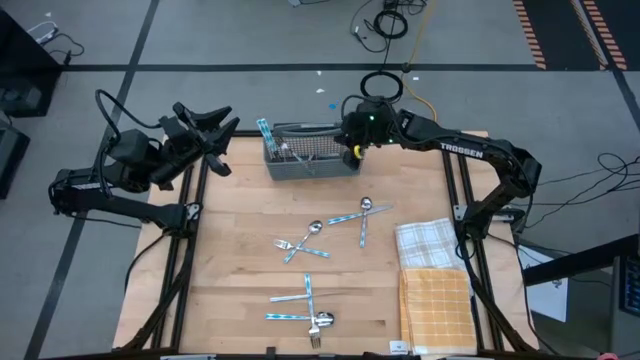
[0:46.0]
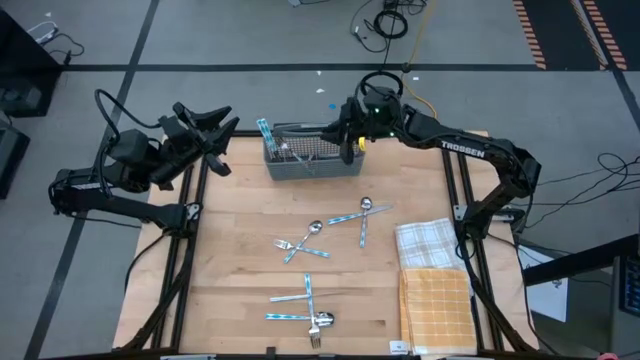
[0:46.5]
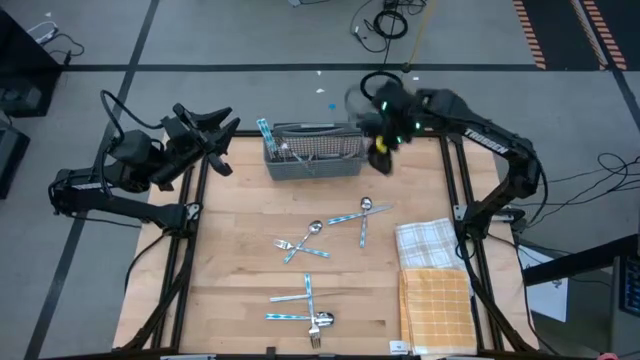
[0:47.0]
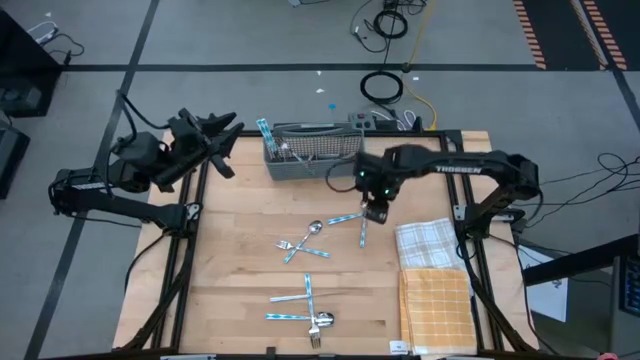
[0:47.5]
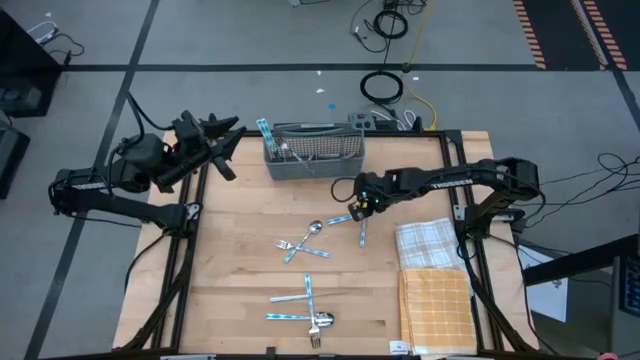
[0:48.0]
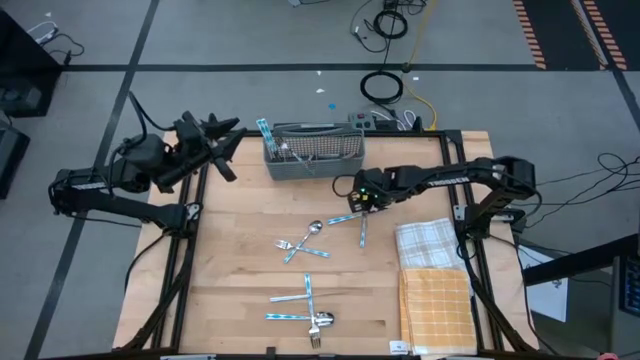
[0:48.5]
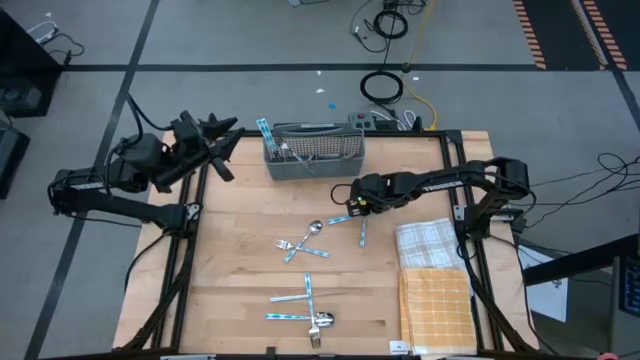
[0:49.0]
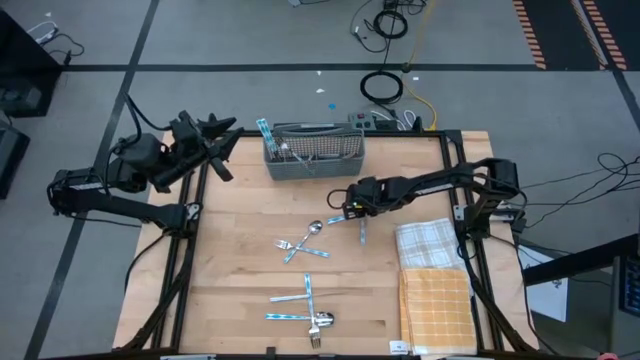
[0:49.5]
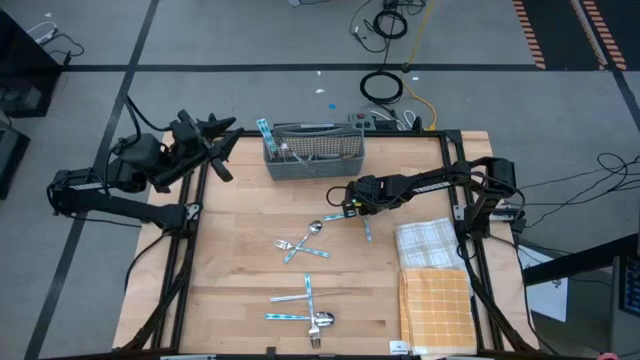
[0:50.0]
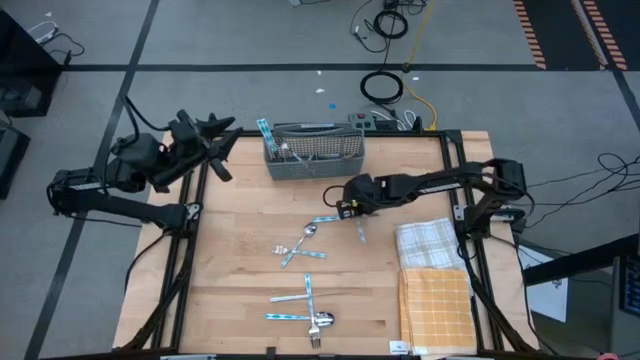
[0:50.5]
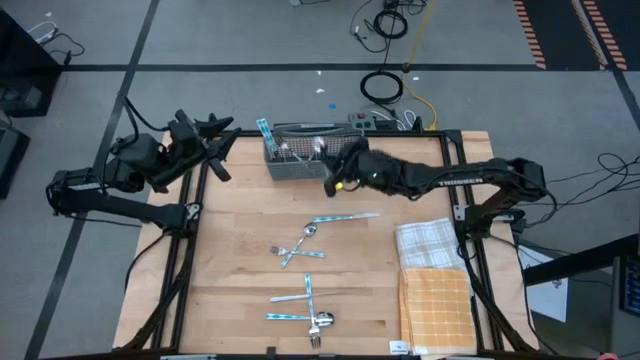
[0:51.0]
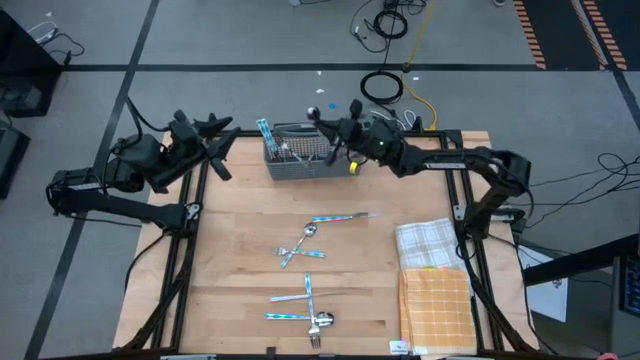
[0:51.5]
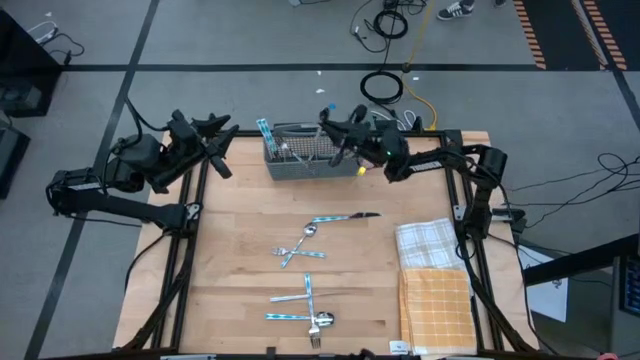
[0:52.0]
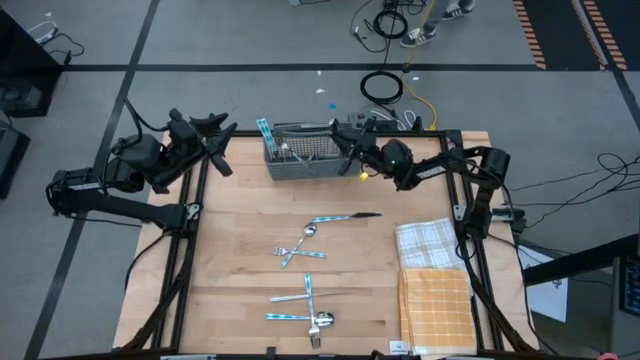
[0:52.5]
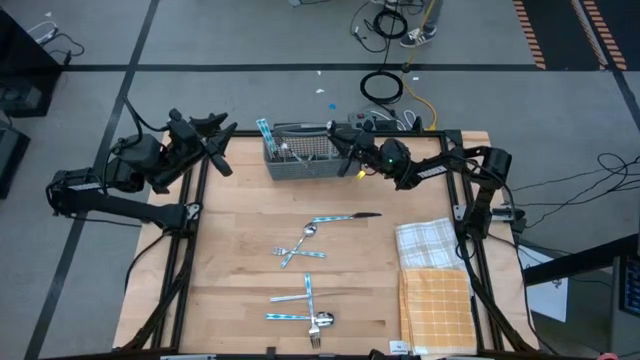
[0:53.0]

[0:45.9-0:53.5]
Task: Sort silverware
Put the top spoon into the middle right section of the utensil holder

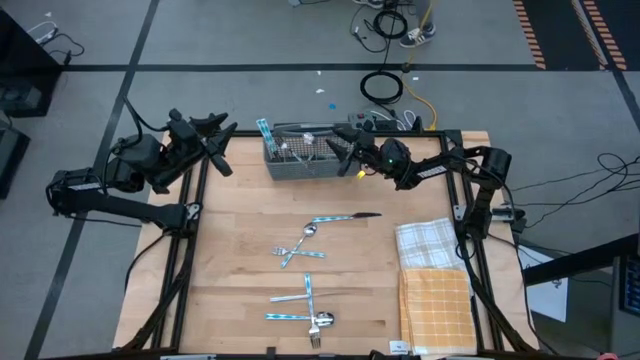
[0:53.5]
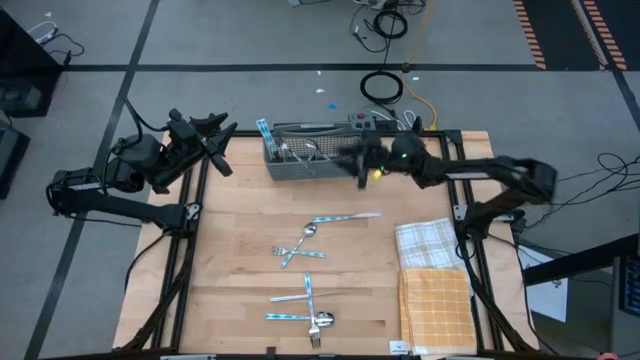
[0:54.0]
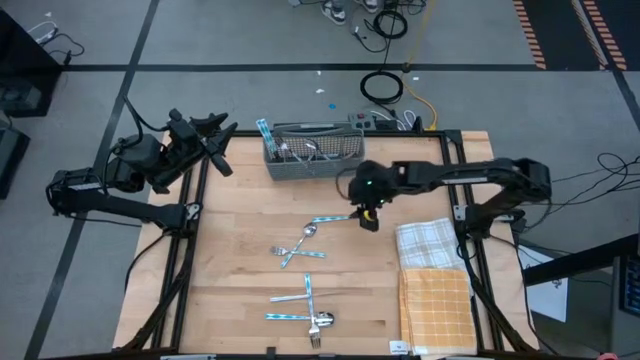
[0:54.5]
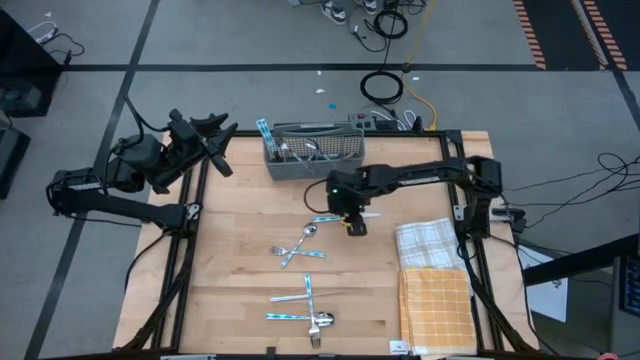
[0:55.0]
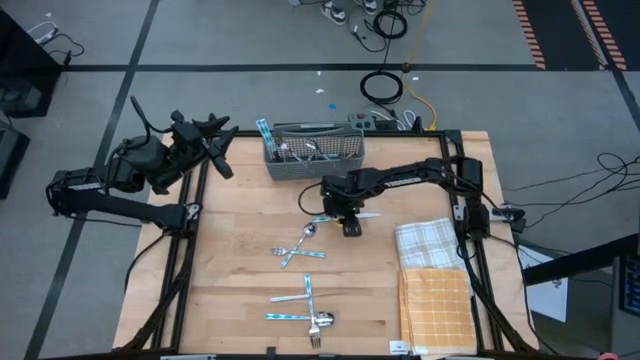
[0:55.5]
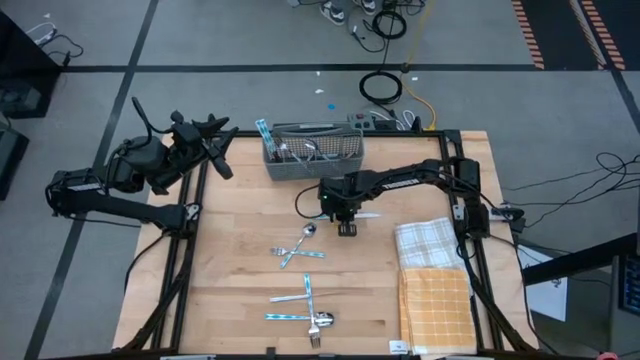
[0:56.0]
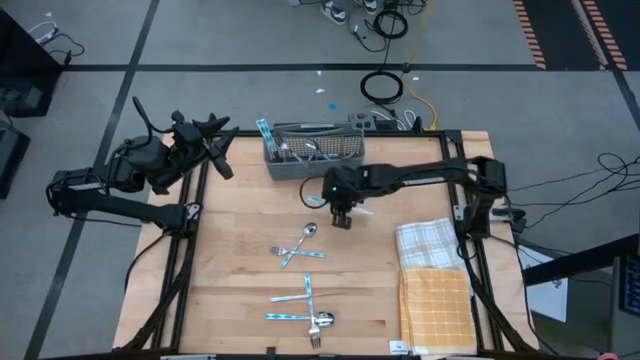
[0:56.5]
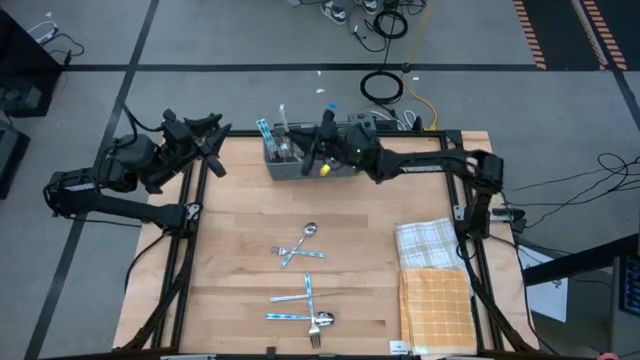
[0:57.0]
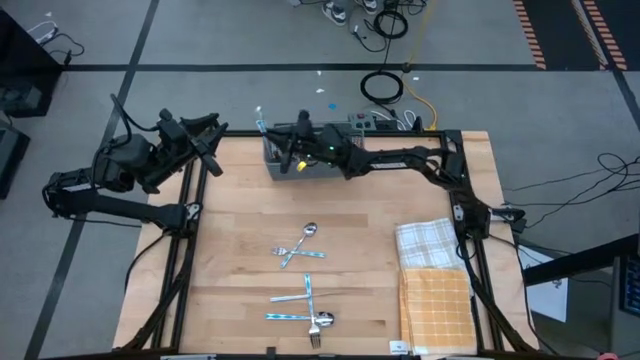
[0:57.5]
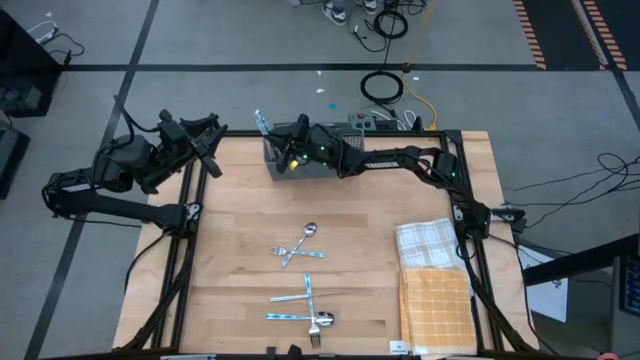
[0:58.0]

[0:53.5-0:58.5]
Put the top knife into the left section of the utensil holder

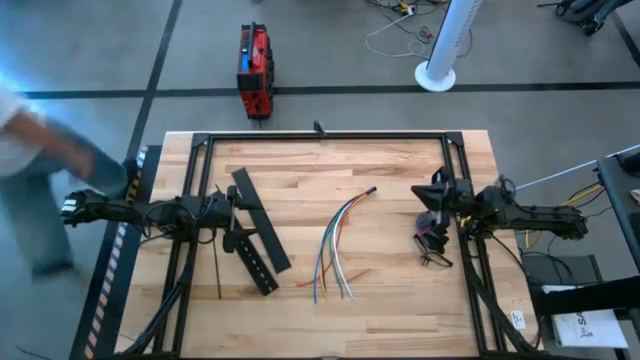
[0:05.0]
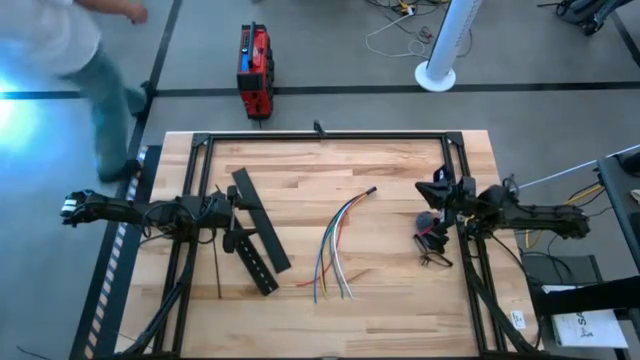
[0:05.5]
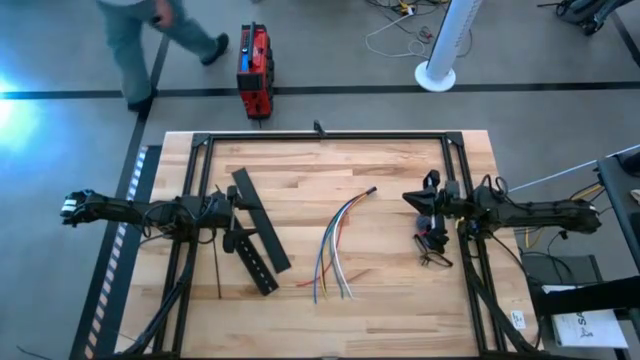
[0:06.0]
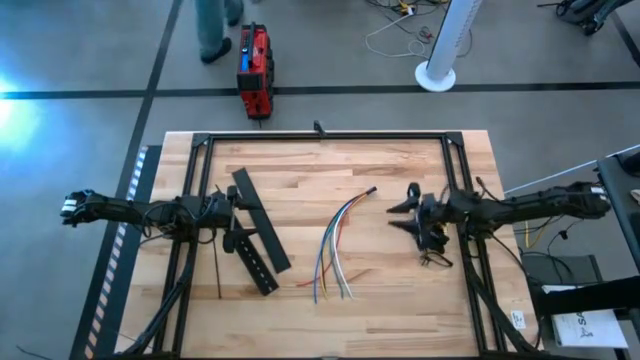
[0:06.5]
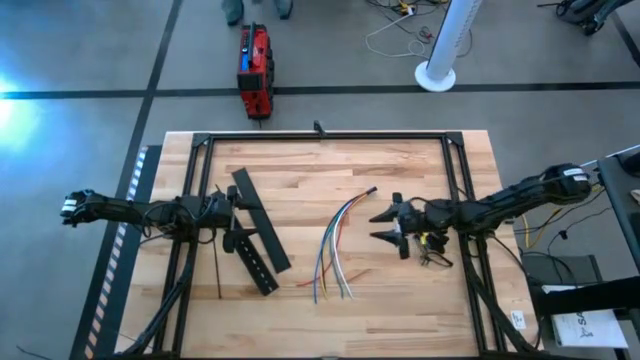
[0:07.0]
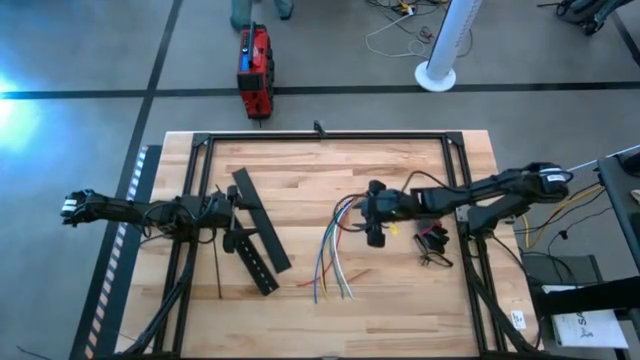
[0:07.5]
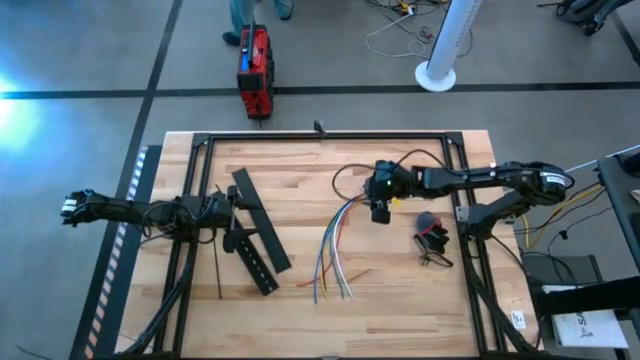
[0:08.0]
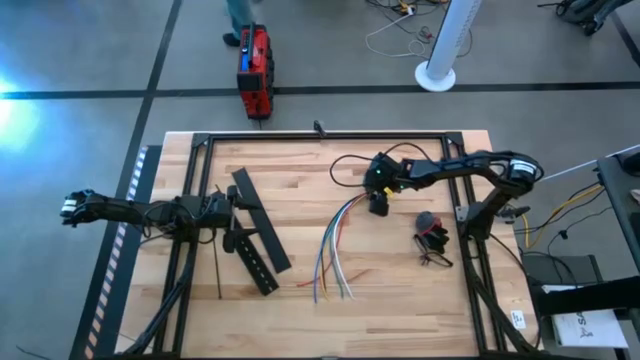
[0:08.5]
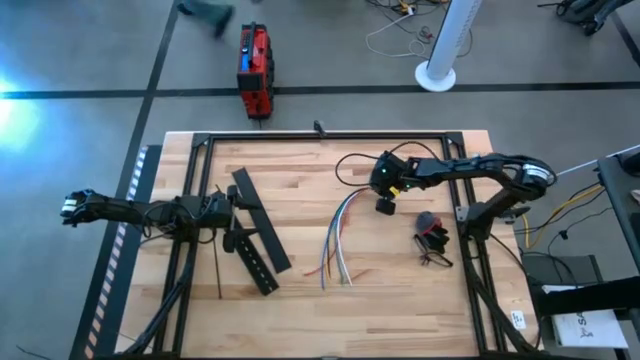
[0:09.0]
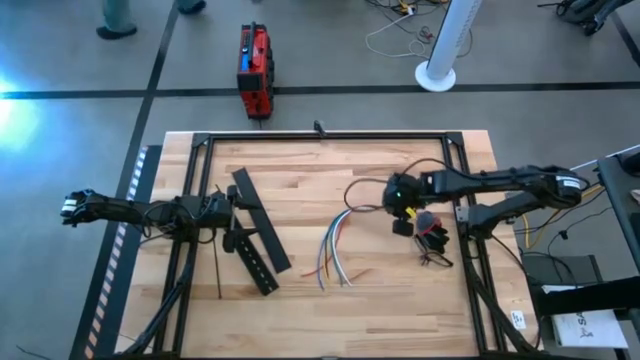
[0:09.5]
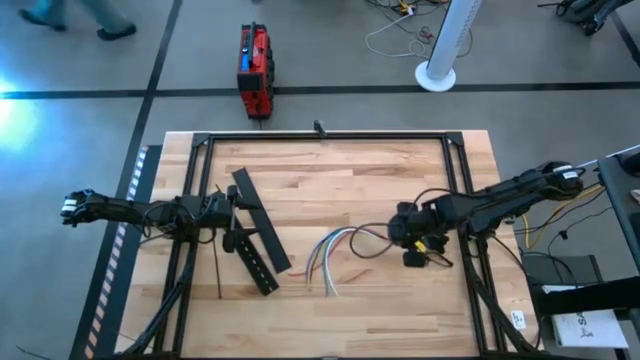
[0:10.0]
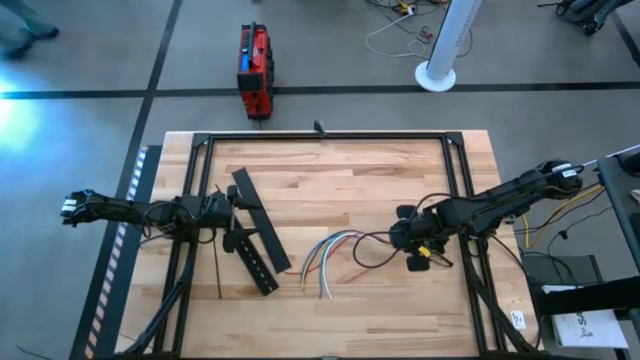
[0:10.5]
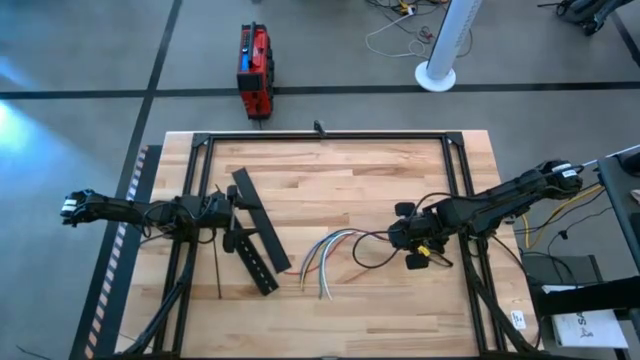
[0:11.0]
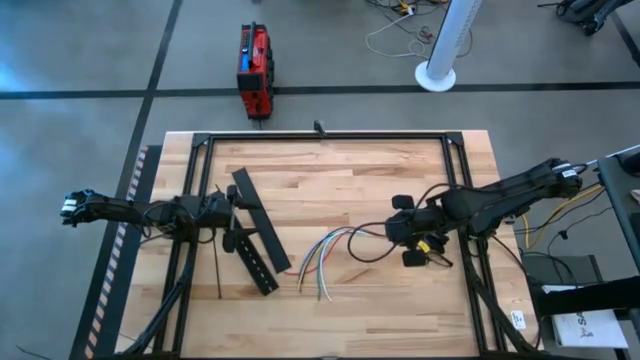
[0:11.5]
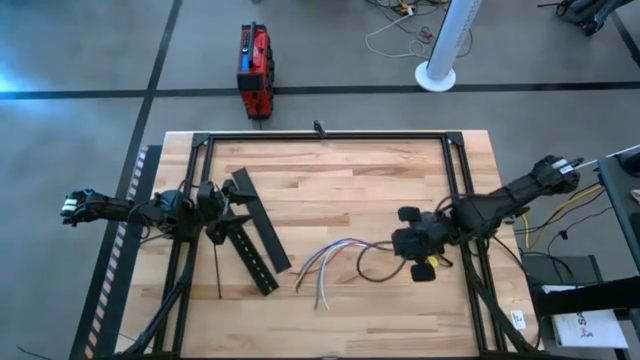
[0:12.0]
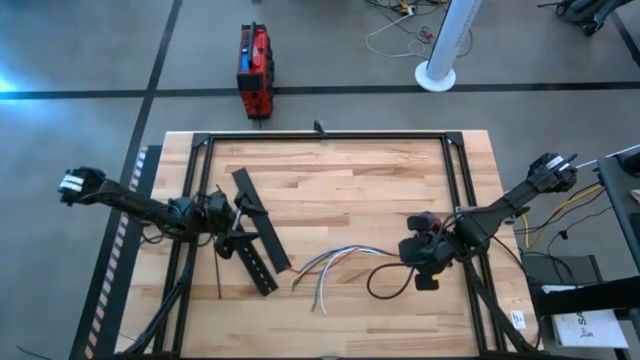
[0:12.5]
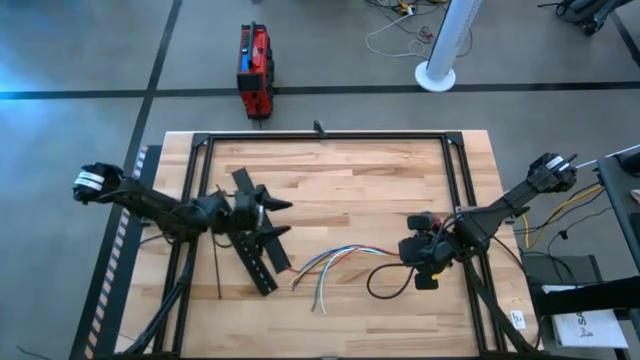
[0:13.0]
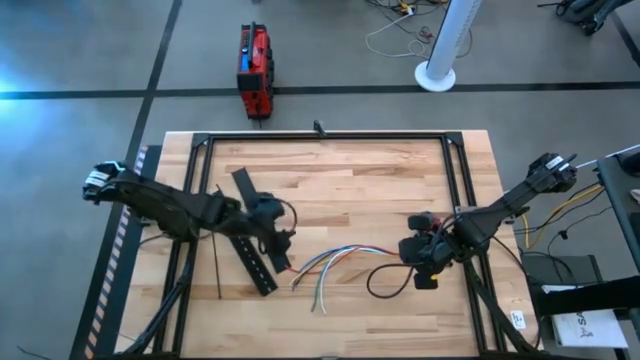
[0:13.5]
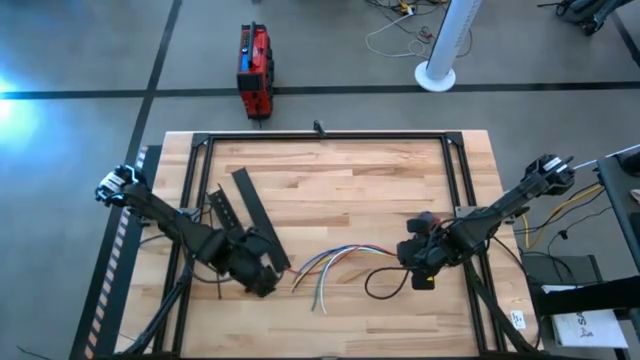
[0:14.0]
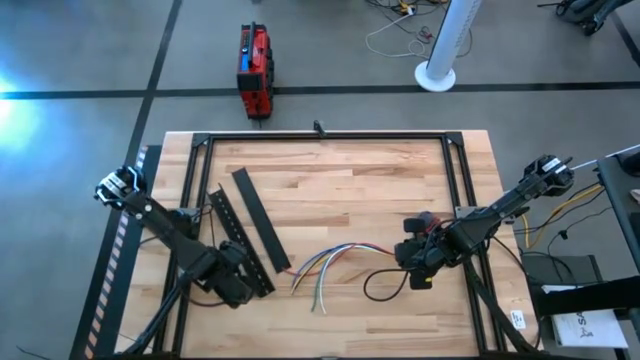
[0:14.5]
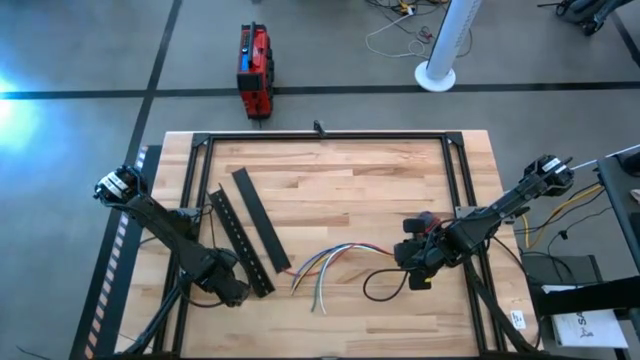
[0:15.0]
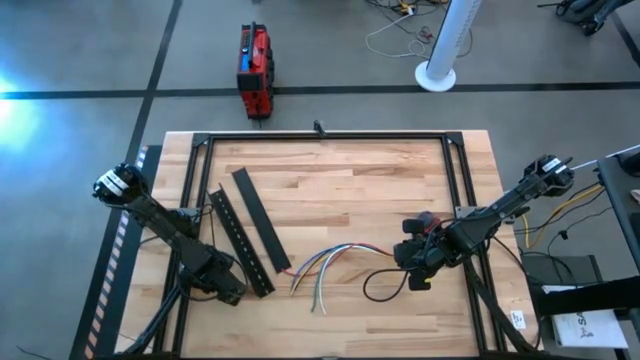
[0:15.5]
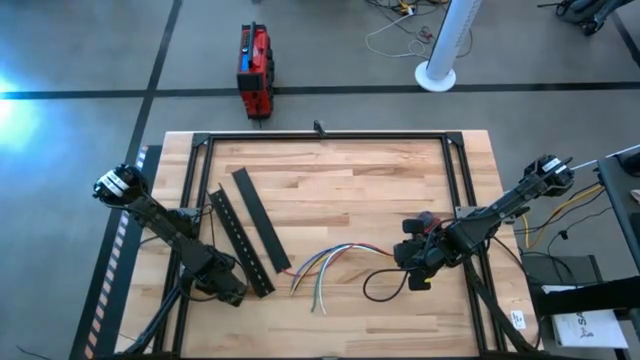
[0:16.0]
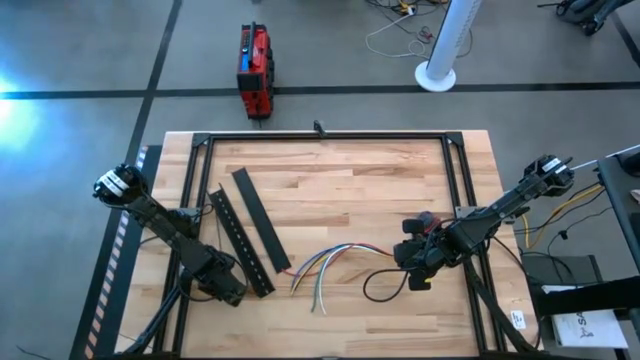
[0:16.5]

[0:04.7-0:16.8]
Task: Ziptie cables
Wrap the cable wires with the black zip tie
